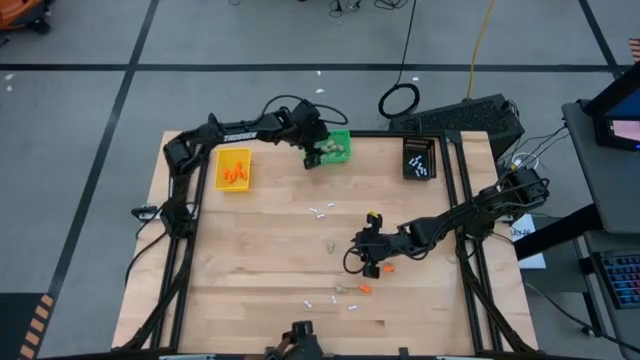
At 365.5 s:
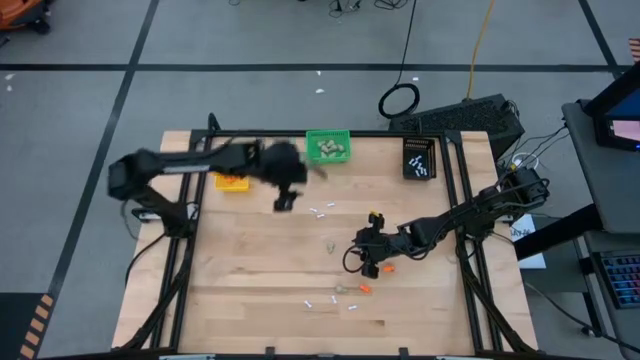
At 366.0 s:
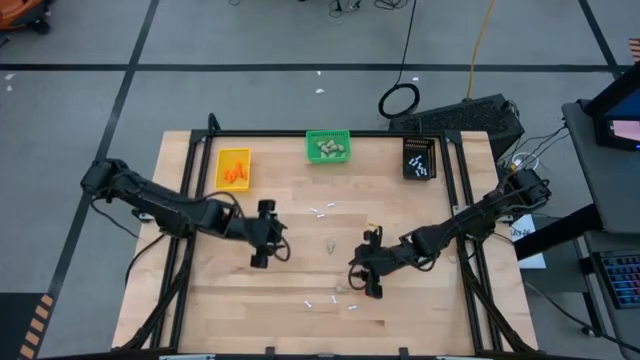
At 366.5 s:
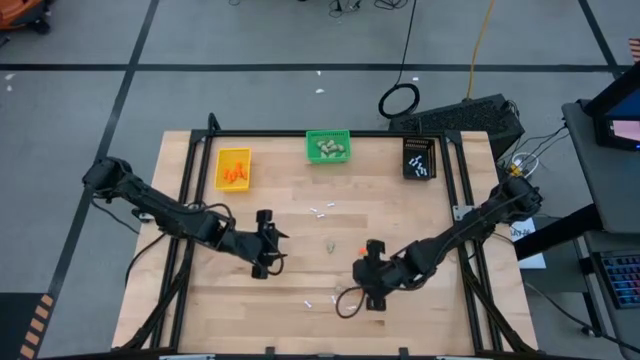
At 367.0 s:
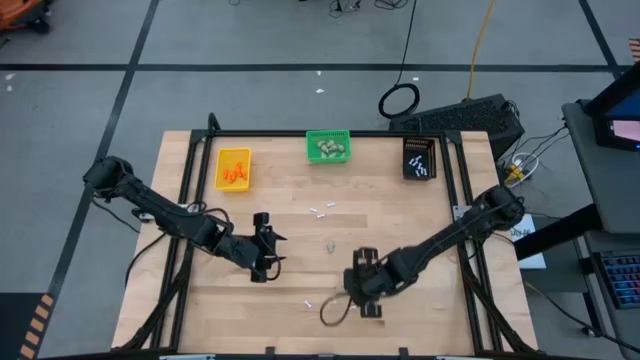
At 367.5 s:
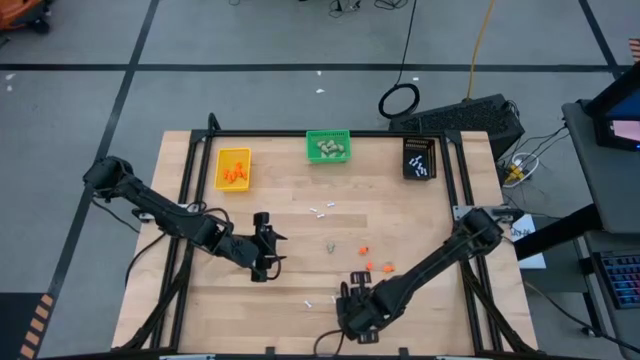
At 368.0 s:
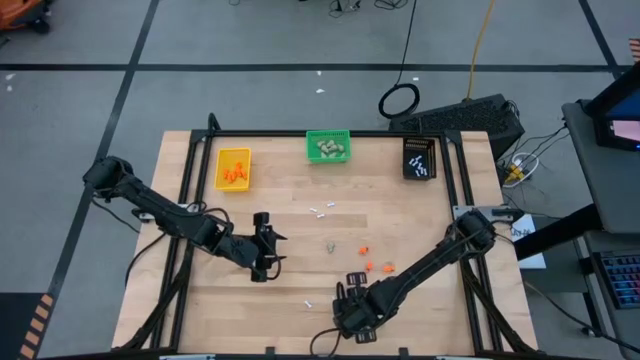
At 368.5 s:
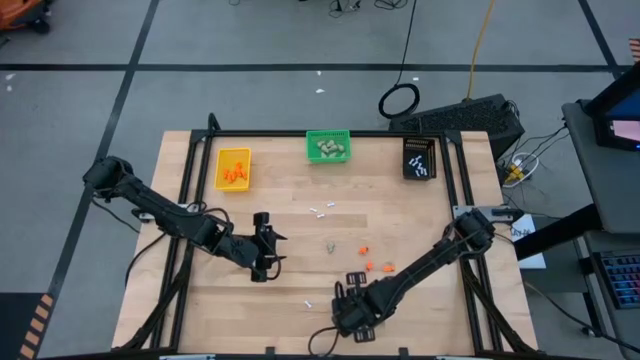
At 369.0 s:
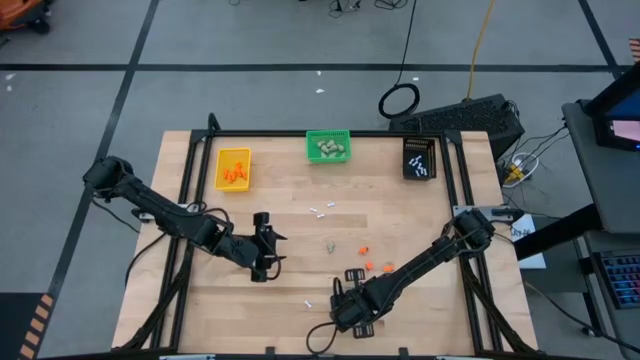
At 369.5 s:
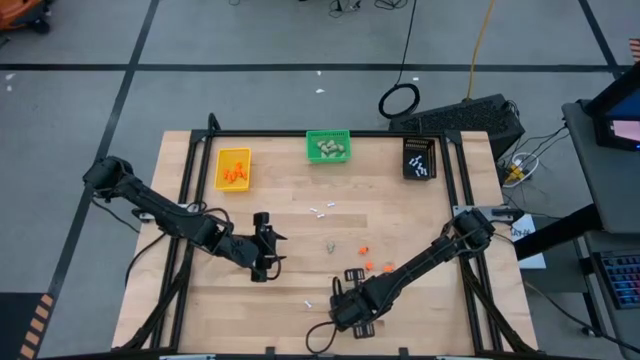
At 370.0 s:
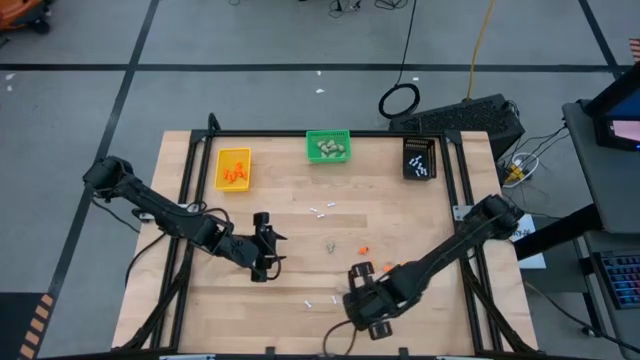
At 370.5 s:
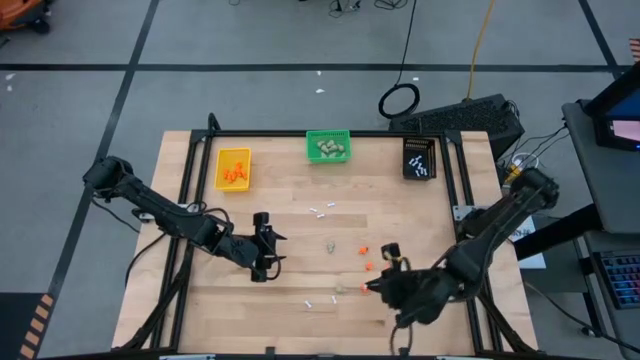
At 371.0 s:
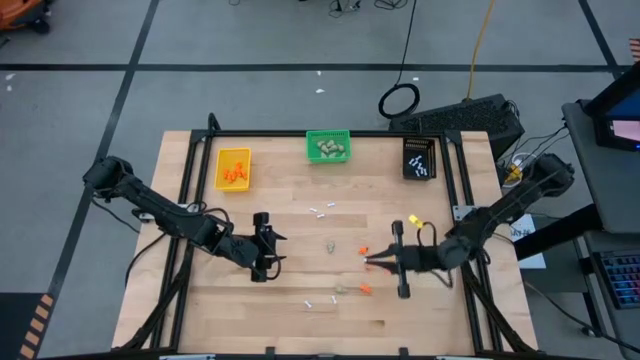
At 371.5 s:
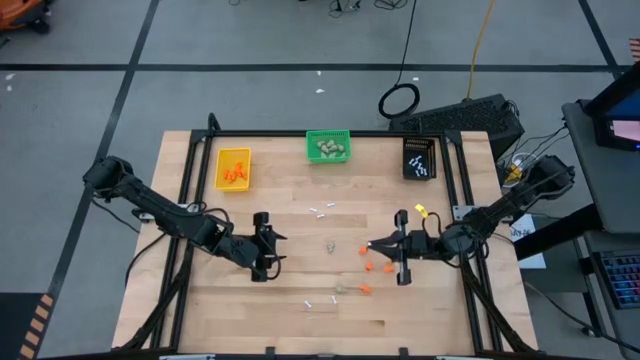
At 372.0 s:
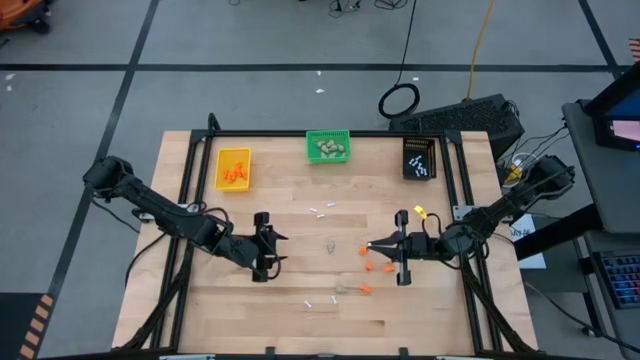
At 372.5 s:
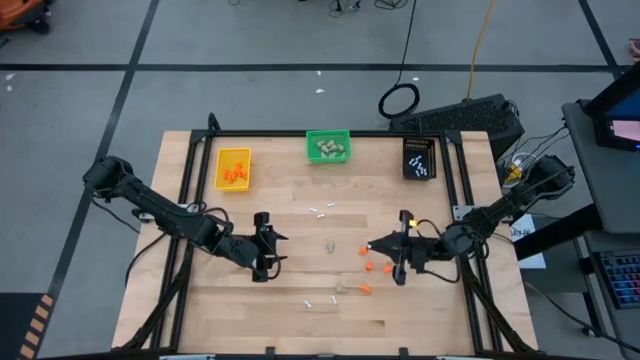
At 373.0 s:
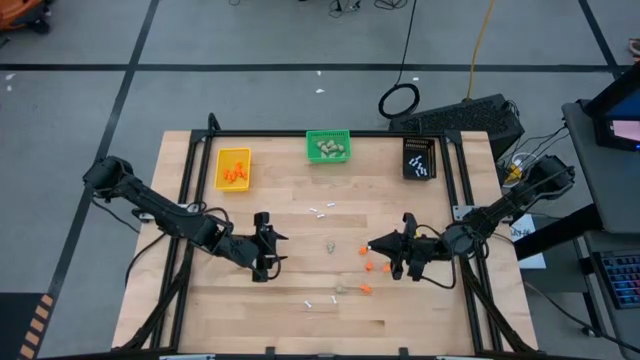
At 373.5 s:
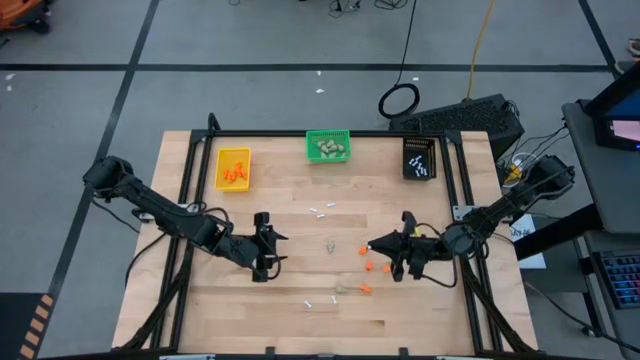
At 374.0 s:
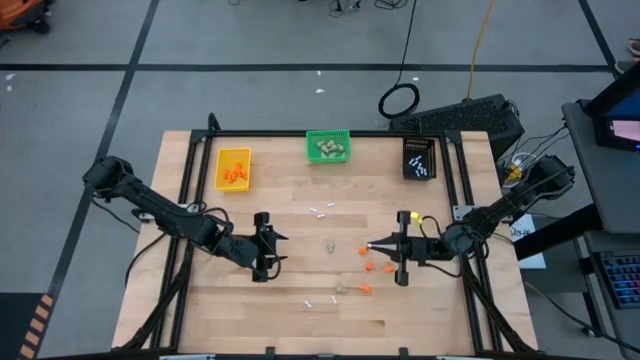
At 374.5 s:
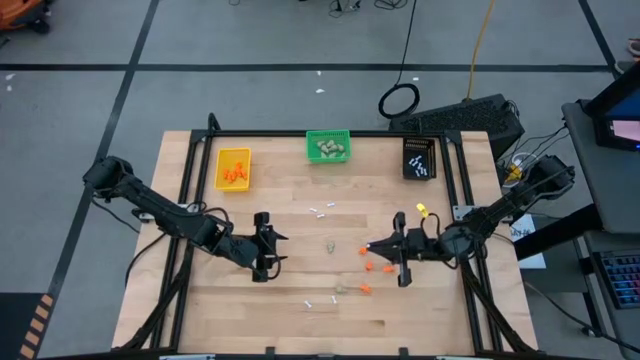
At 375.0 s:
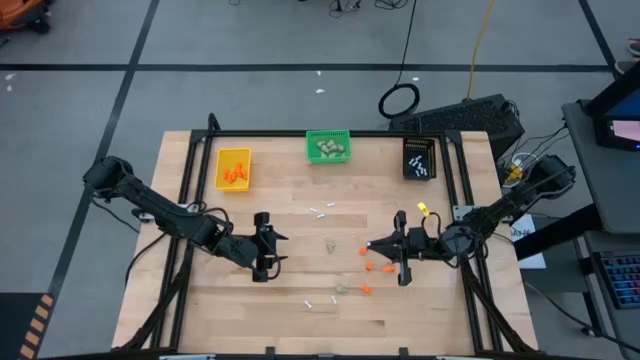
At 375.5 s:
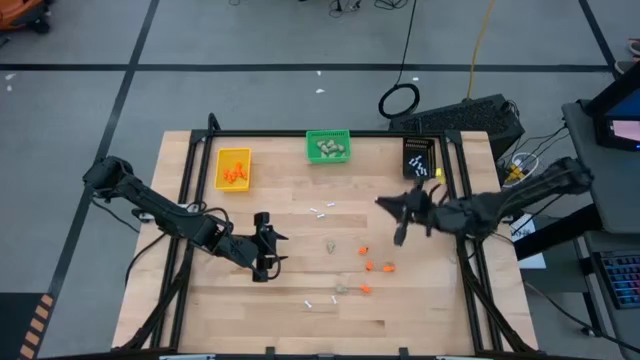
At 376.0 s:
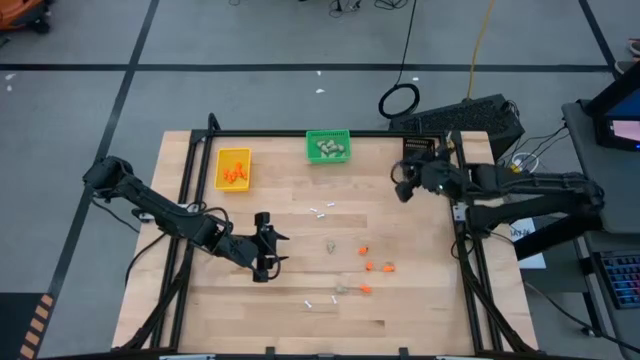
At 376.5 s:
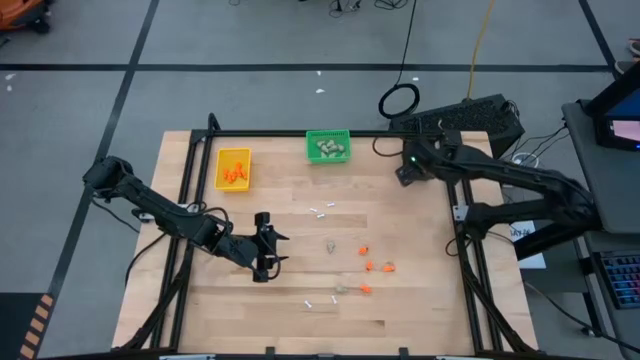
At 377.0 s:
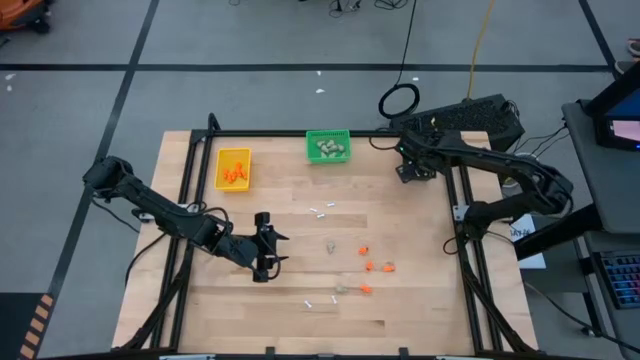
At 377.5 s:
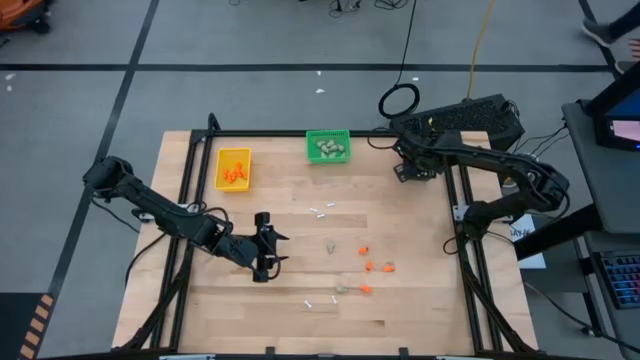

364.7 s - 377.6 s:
Task: Sort Halloween decoration
Put the white bone toy into the black bin

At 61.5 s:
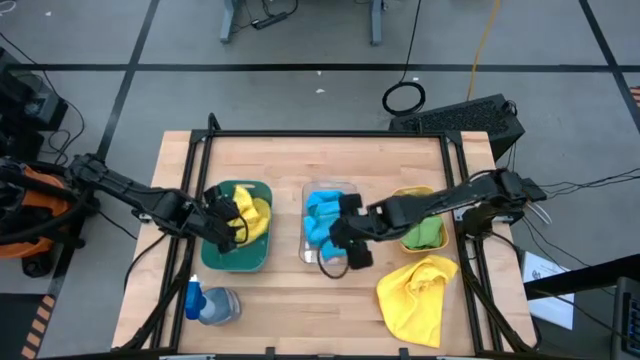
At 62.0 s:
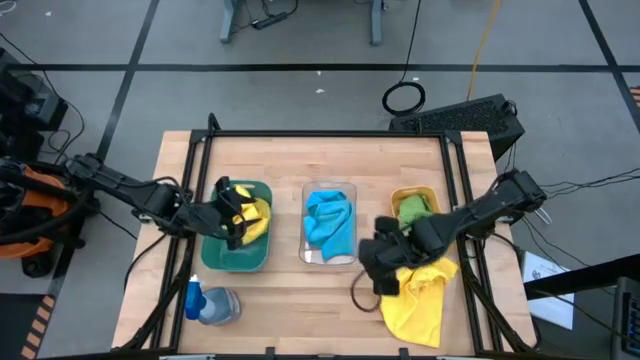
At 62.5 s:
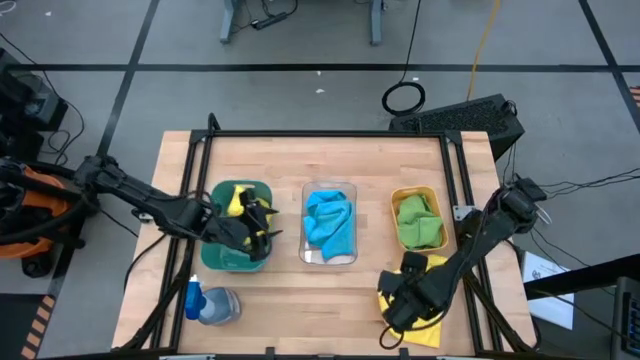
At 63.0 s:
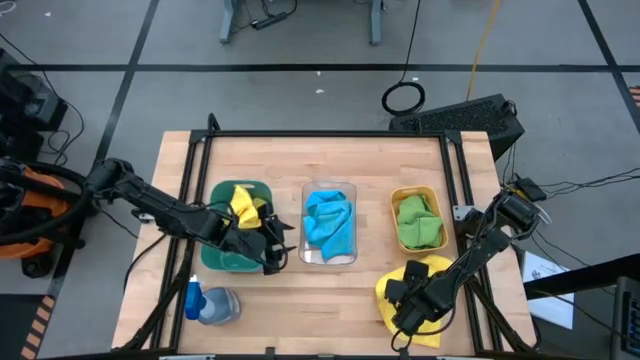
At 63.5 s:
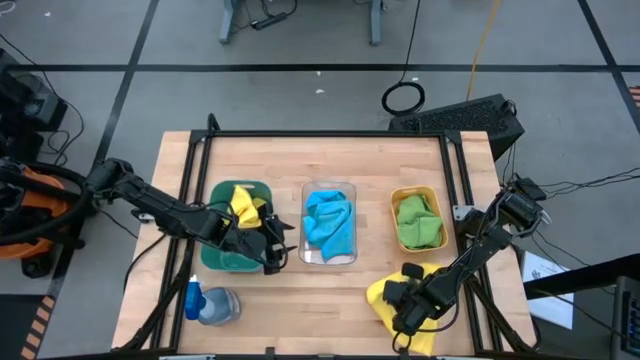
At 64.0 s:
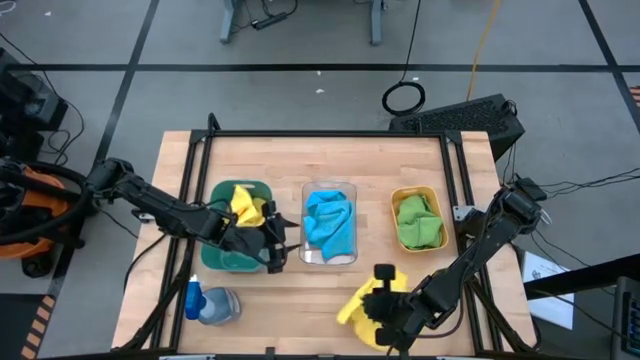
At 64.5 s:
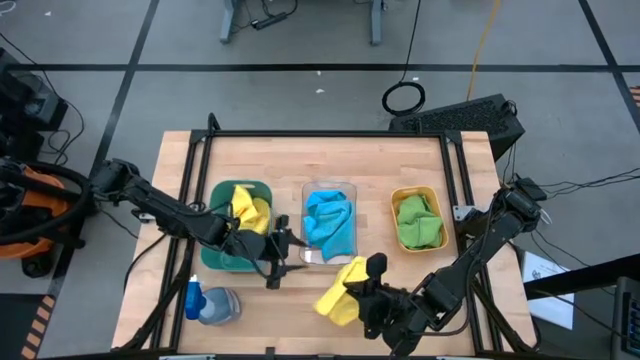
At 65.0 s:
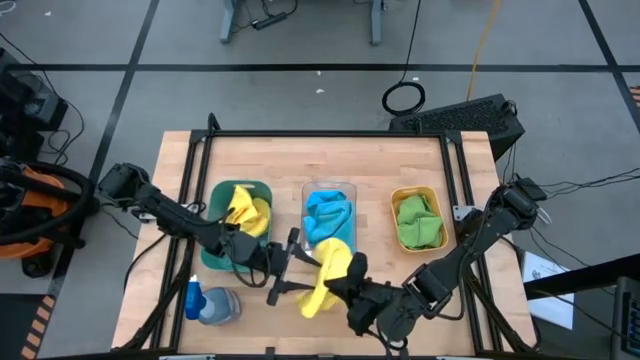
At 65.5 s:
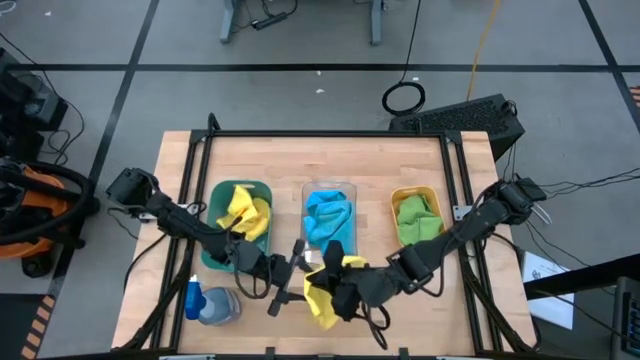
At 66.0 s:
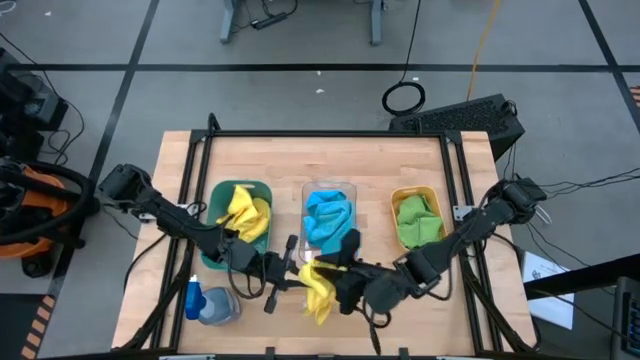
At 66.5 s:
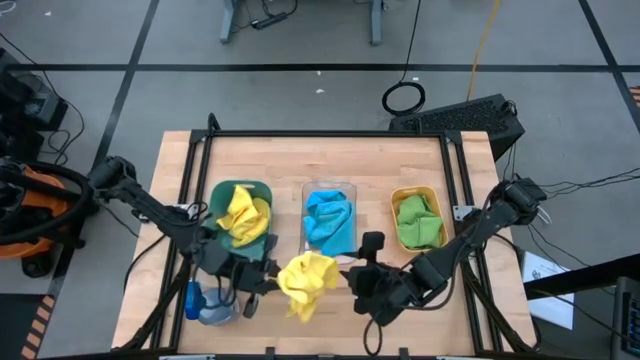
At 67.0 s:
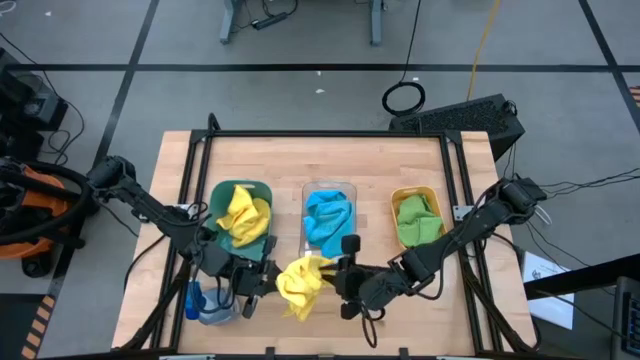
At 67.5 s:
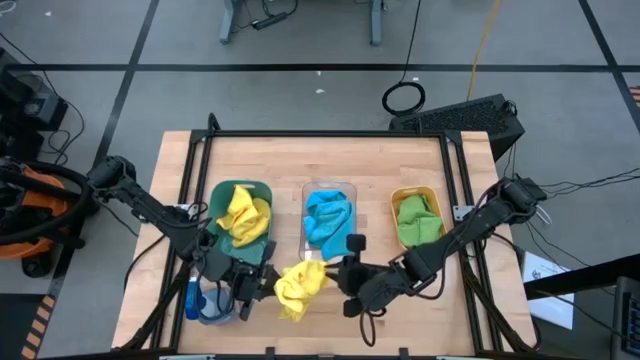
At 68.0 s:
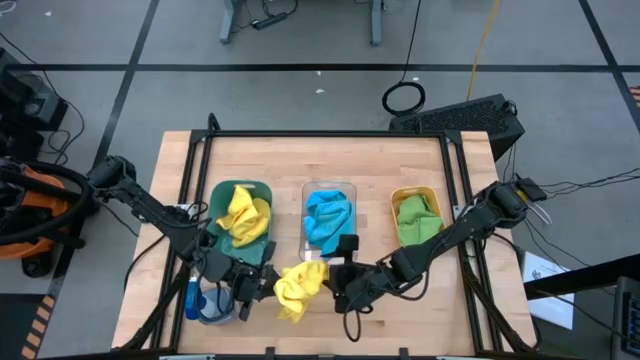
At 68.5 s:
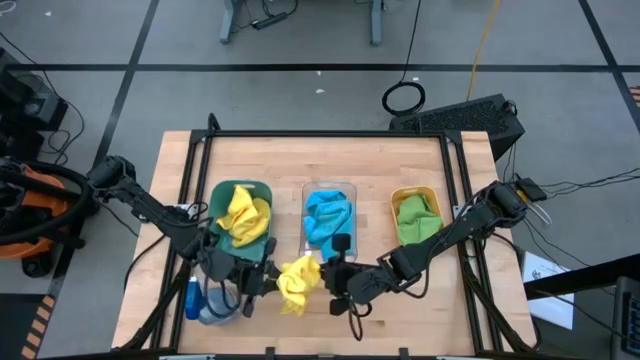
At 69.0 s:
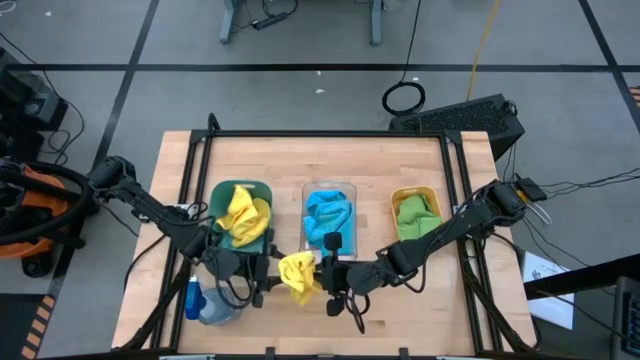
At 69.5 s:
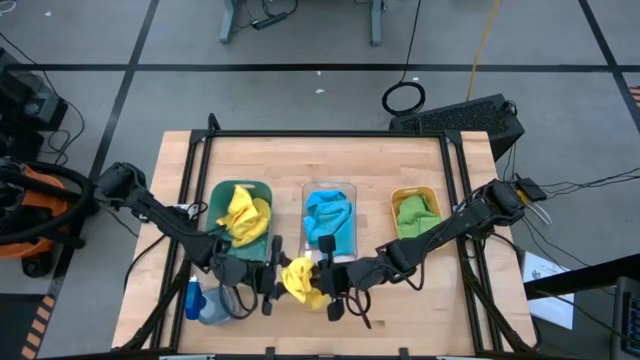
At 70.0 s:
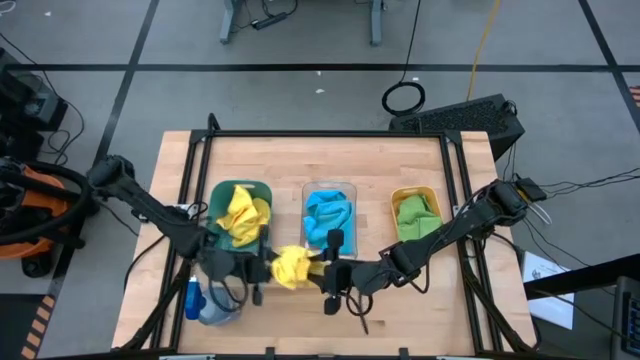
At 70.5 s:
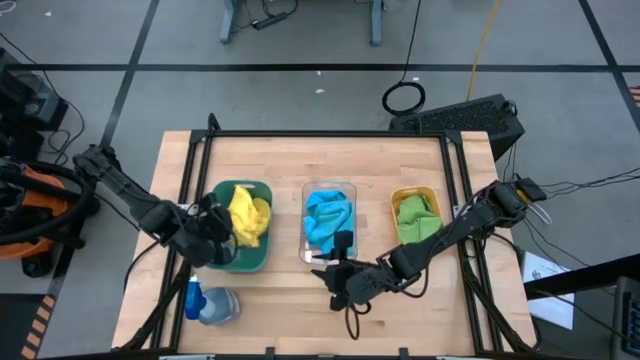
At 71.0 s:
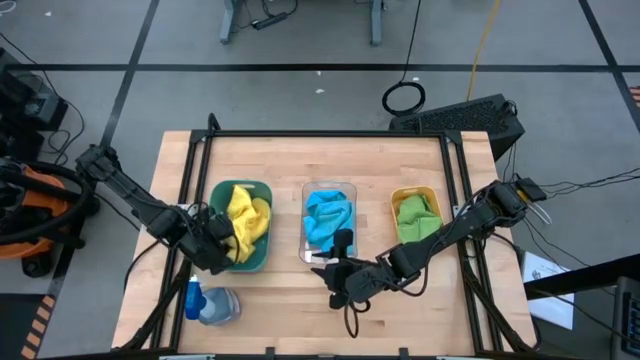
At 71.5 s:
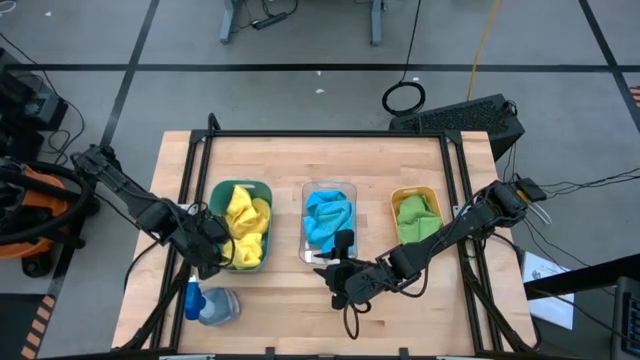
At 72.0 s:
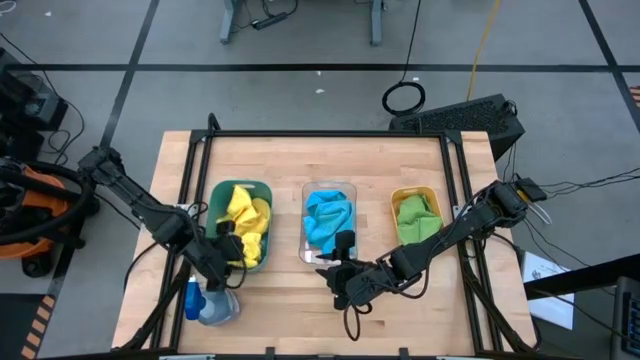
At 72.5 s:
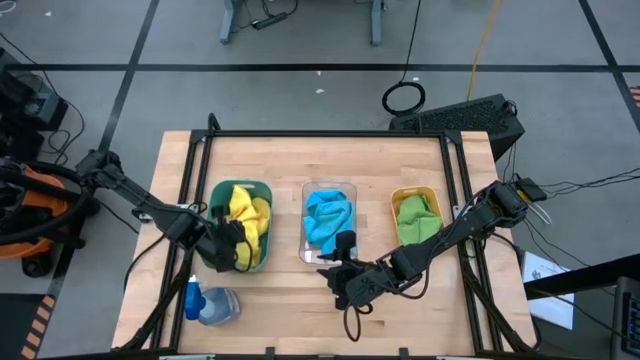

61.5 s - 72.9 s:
Task: Sort microfiber towel by color & place in baskets
Put the yellow microfiber towel into the green bin
